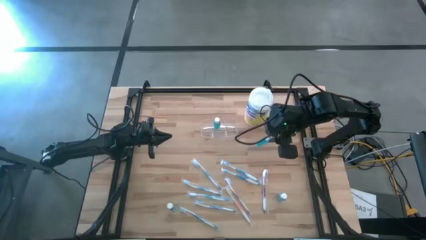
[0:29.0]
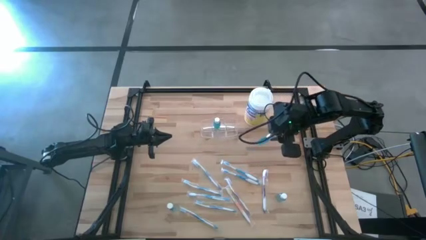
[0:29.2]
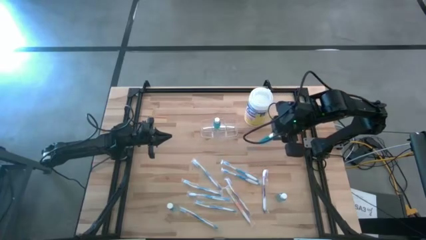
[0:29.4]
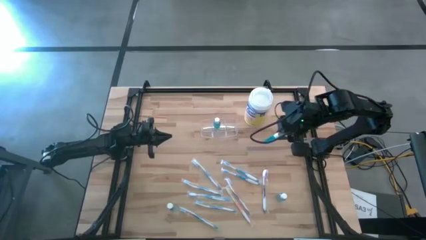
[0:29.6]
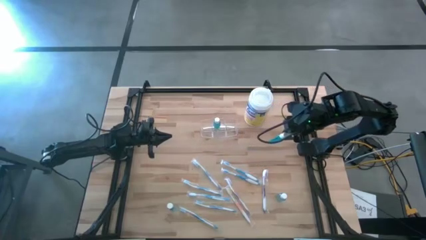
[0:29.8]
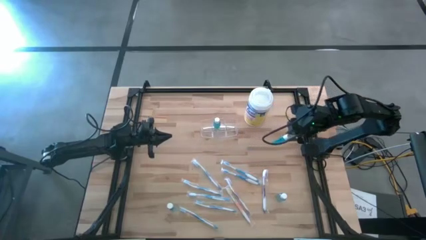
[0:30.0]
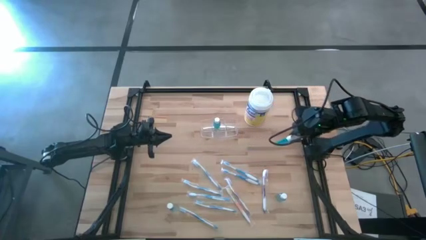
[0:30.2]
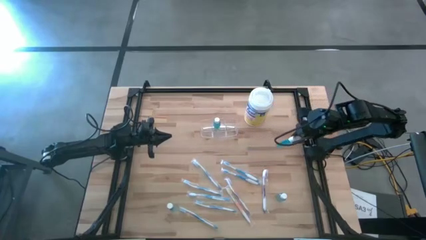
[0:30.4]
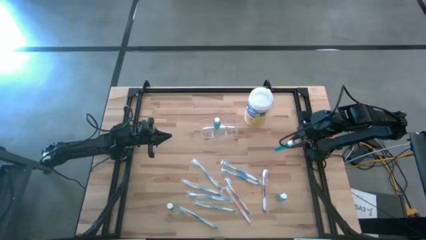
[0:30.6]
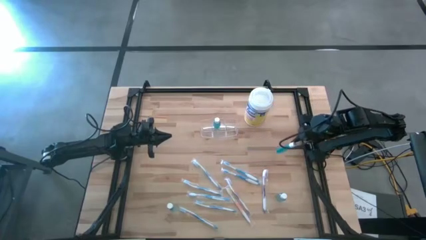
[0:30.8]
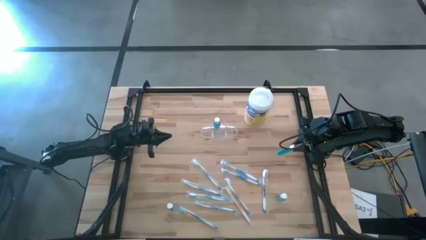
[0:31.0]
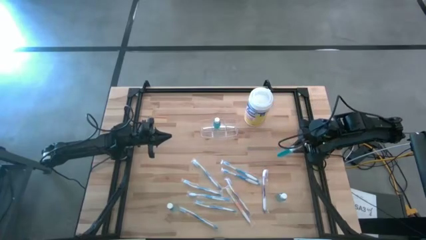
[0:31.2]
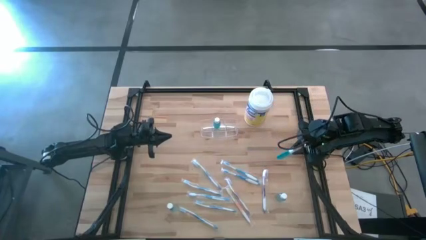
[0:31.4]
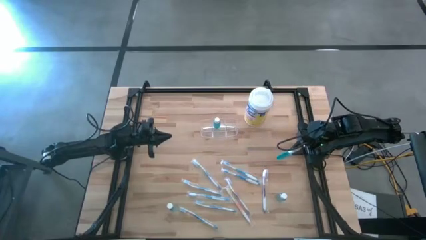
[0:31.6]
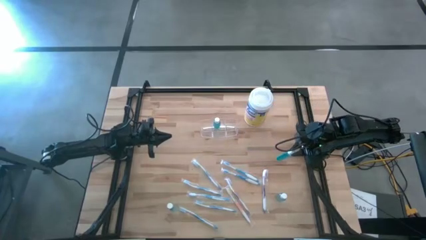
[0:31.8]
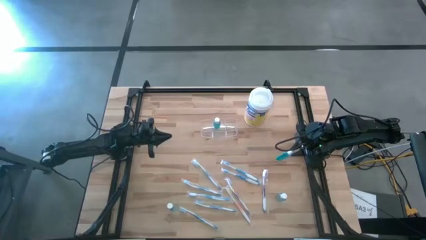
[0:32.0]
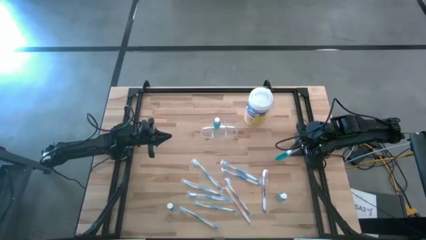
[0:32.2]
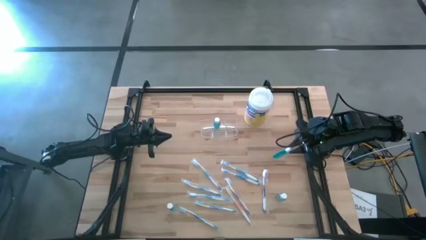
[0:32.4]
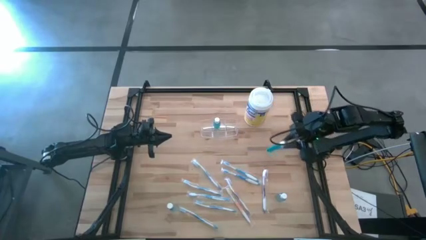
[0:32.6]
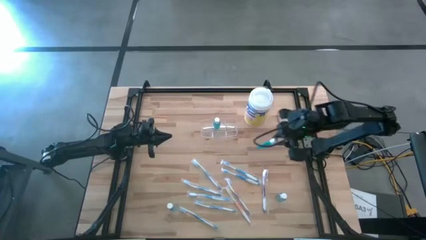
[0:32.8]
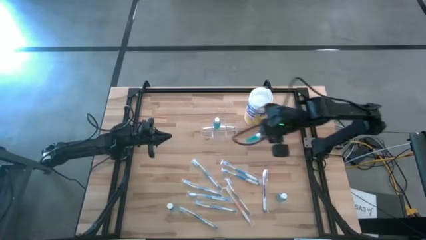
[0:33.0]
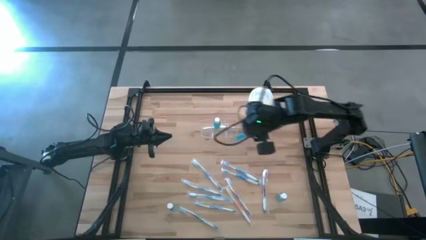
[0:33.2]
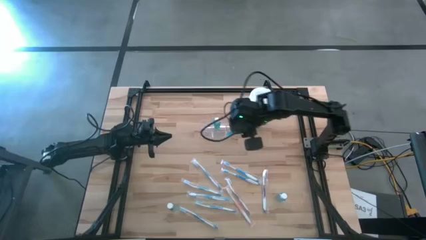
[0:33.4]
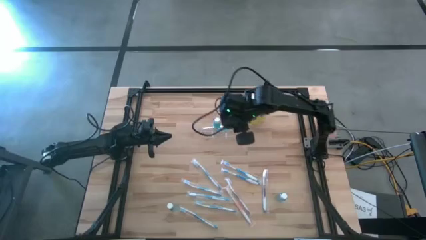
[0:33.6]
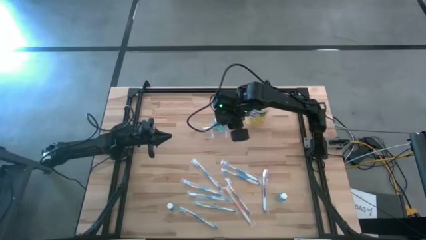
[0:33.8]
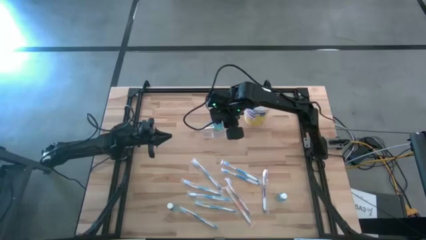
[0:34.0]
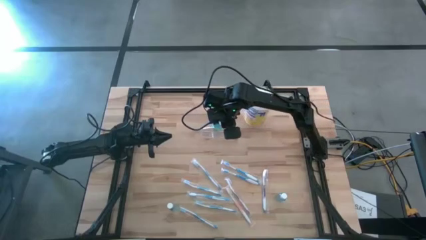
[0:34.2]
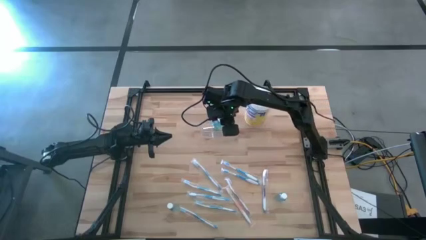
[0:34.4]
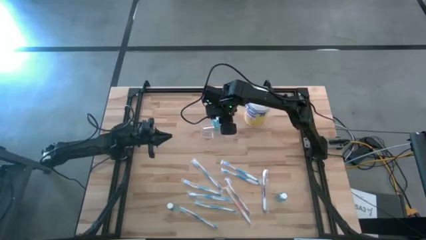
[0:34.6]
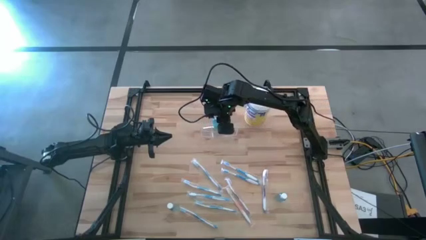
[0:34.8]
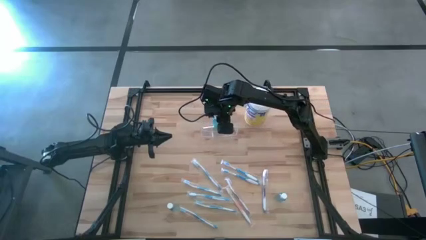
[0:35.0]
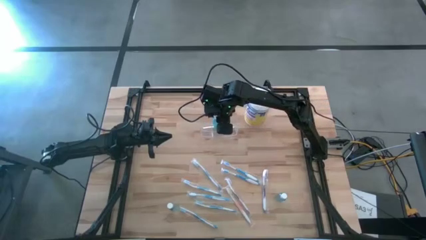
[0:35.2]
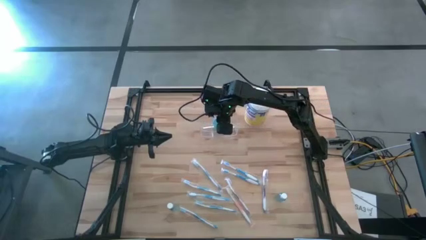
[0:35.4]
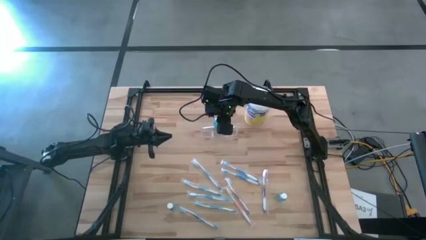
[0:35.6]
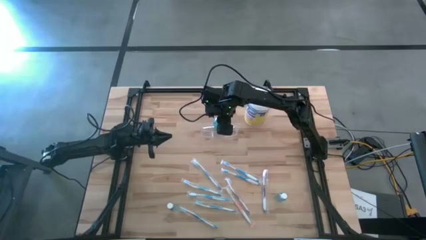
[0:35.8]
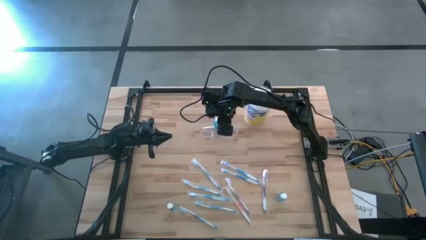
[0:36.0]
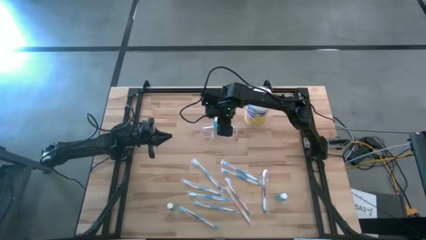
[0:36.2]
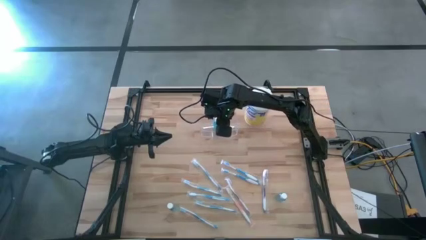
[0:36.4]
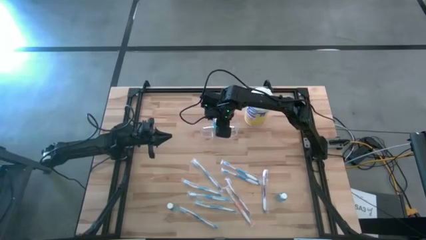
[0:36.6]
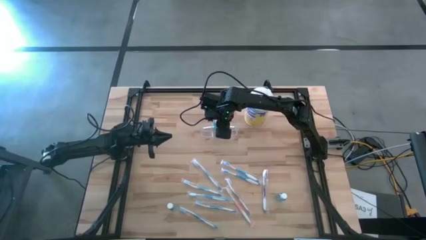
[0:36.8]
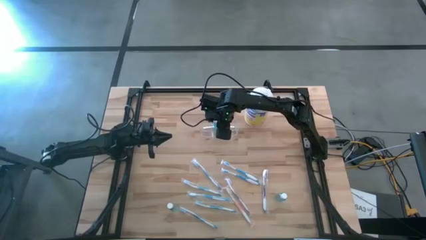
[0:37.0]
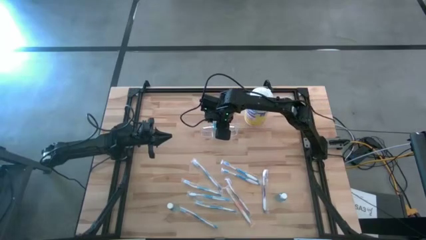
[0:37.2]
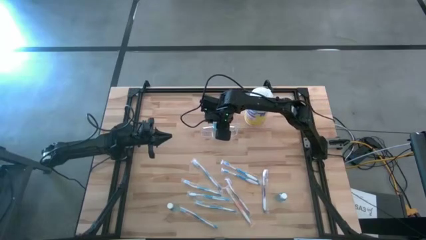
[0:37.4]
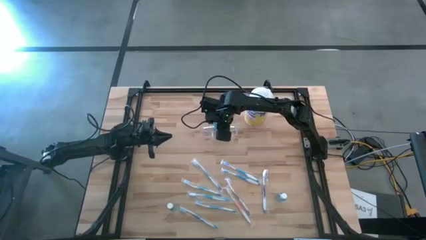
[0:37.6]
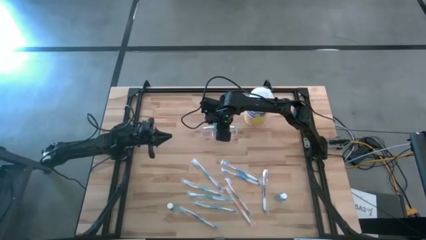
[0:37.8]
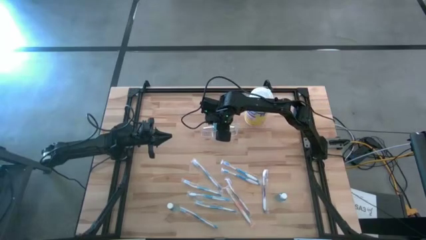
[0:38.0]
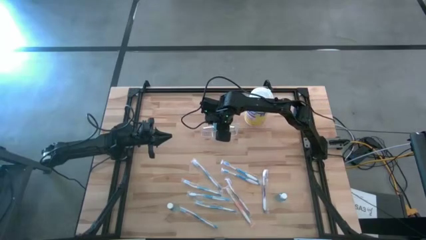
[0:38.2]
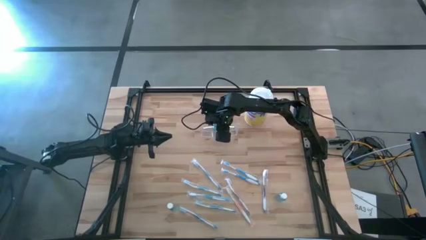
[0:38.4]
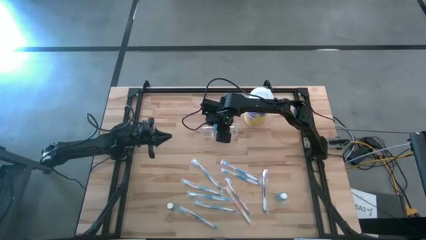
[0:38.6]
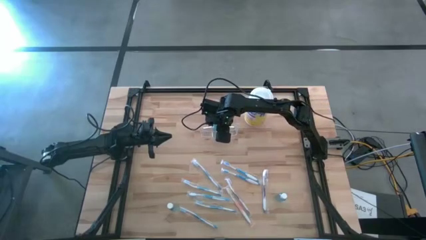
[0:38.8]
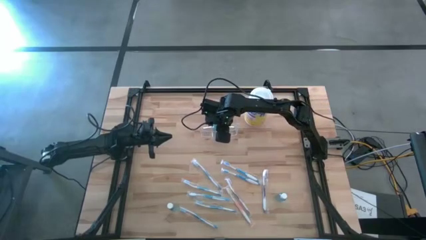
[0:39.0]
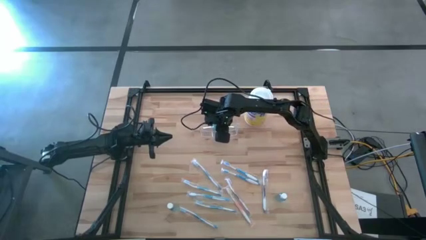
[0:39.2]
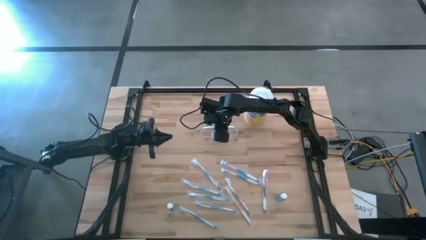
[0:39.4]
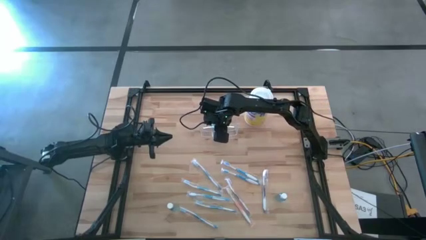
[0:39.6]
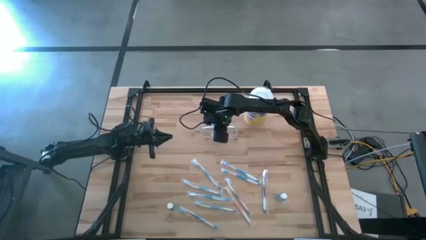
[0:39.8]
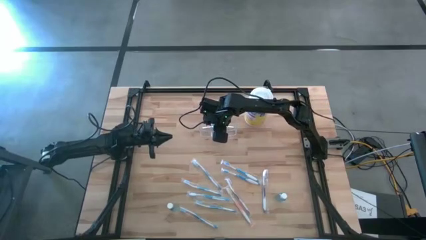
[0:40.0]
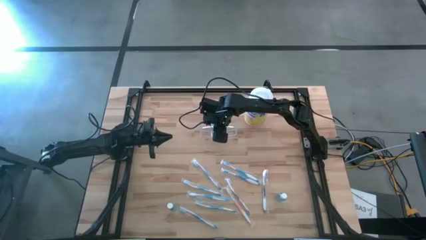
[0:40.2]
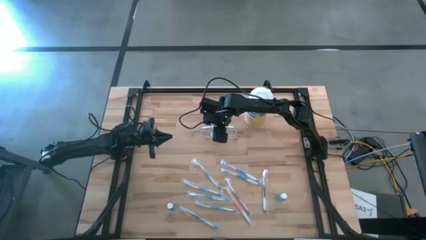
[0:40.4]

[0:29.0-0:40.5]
Task: Pick & Place toothbrushing station
Put the blue mouthwash into the transparent organizer
